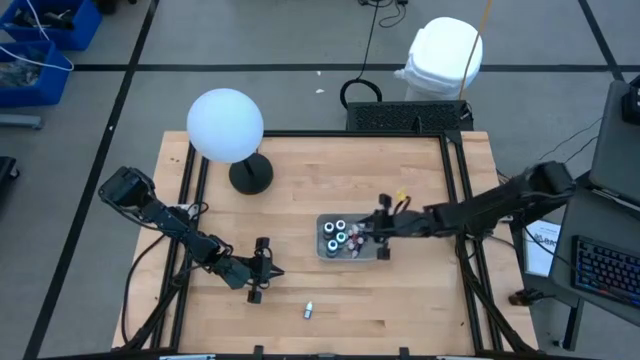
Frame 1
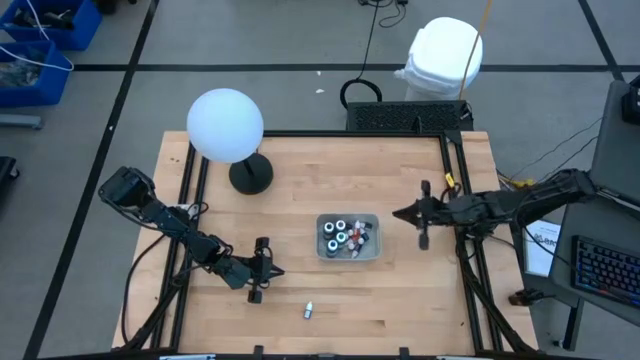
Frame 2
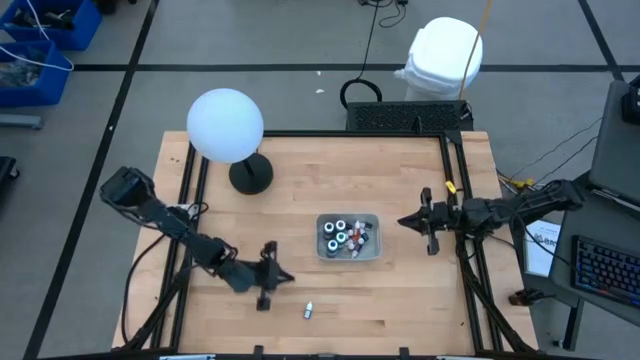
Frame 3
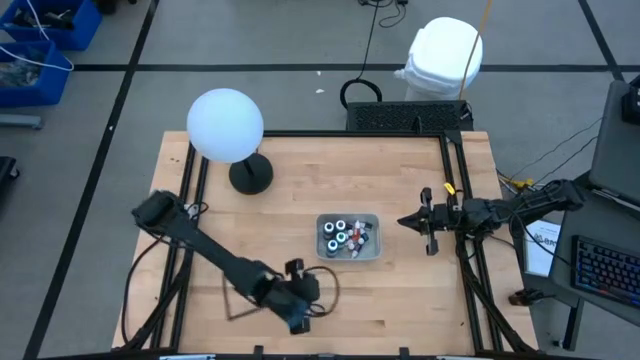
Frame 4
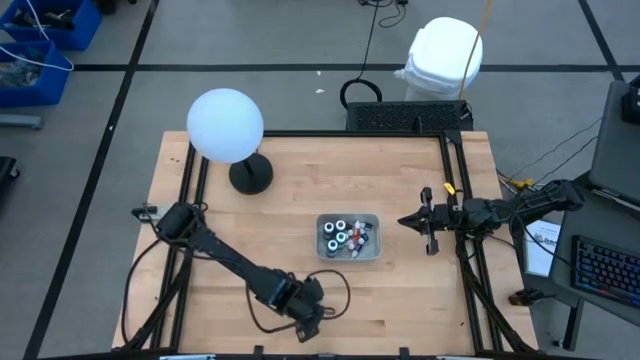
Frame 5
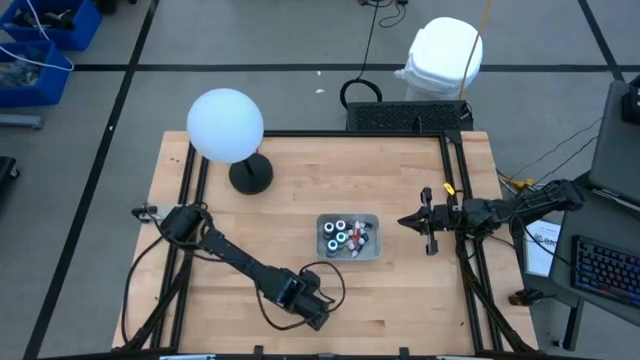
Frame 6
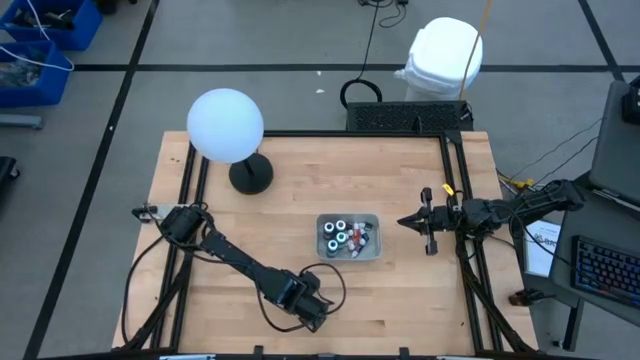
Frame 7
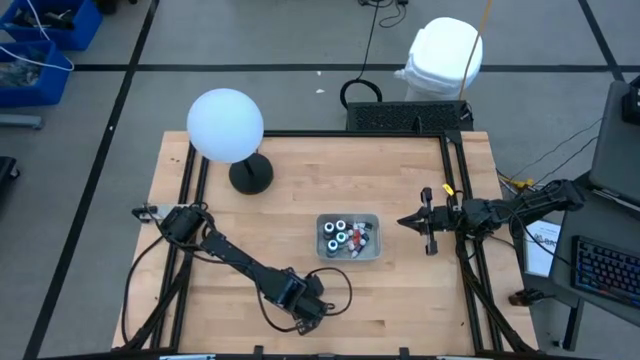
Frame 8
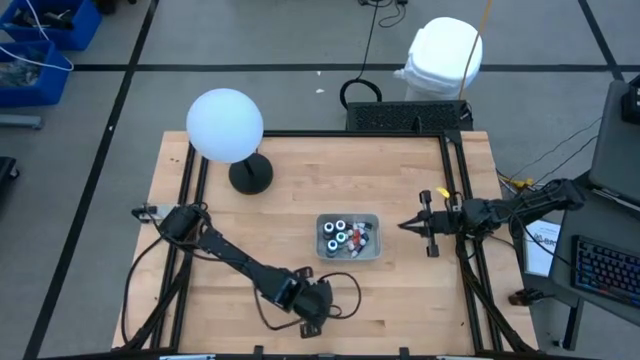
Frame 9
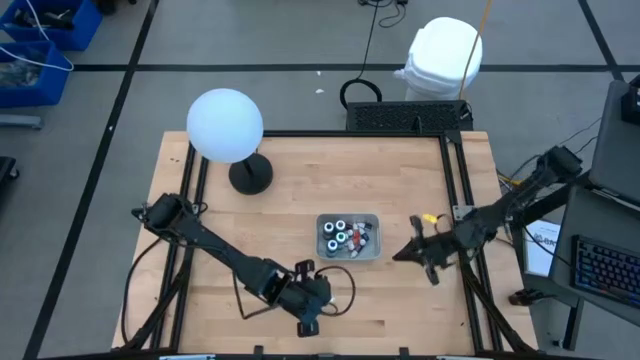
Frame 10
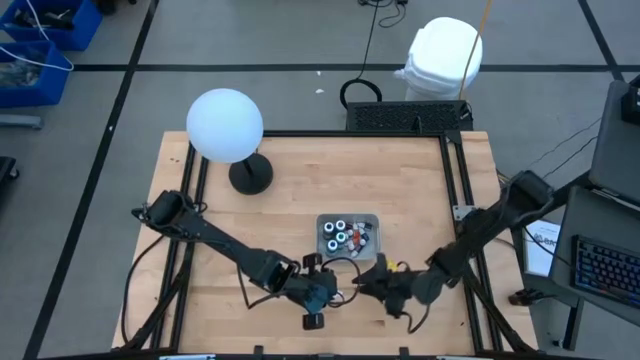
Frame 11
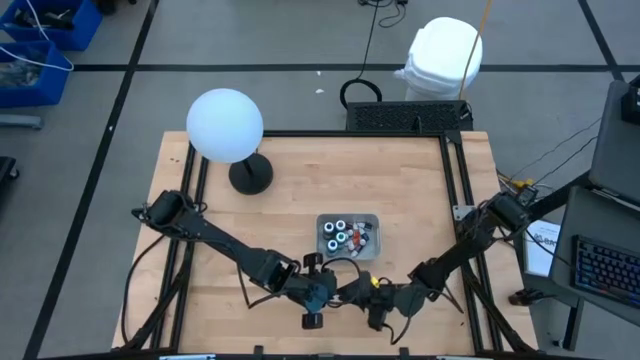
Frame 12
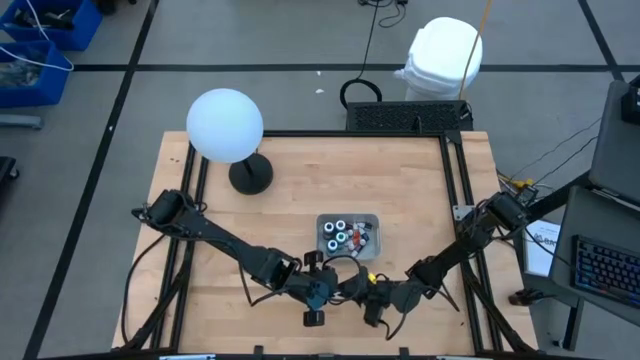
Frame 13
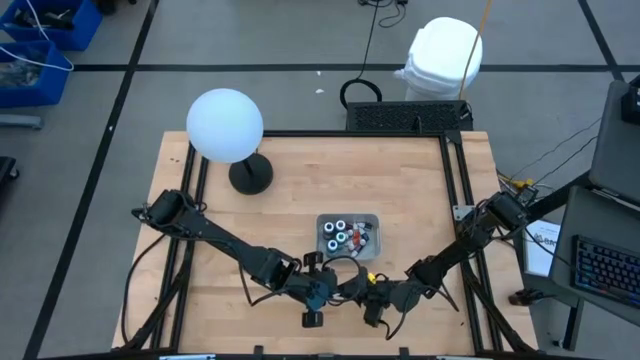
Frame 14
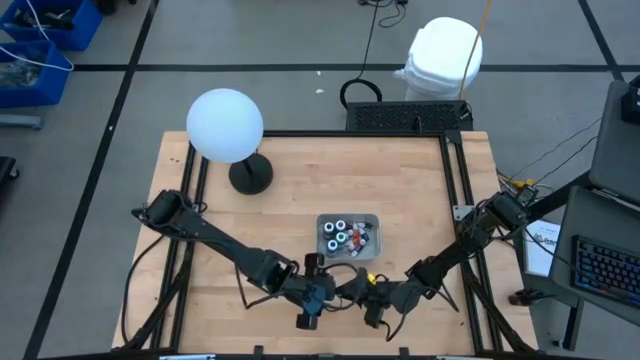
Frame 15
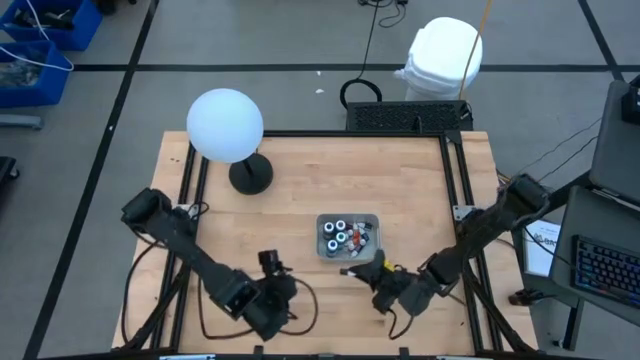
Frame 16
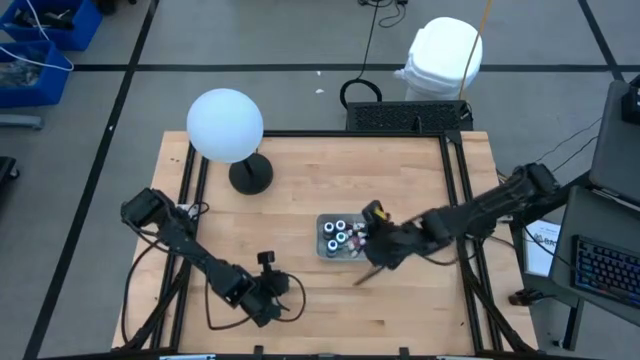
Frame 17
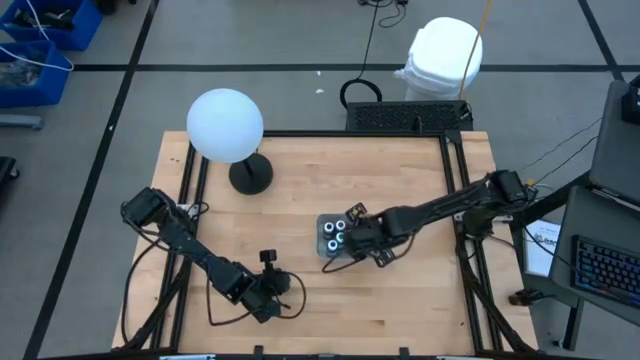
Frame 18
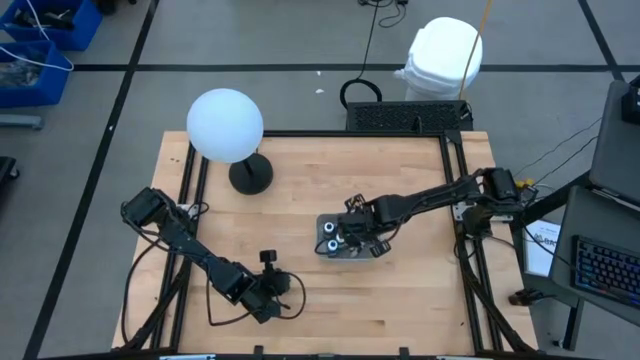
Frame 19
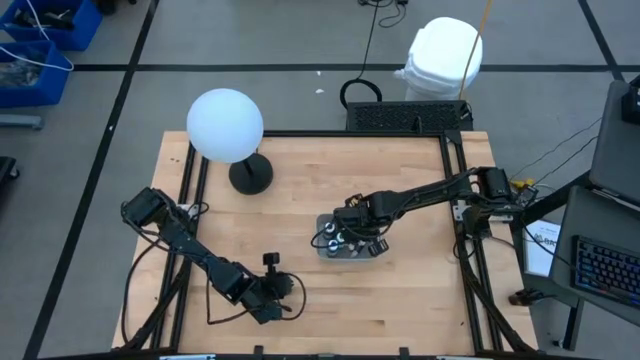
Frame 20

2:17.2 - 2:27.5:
Task: Pick & Place food coloring
Put the small dark purple food coloring bottle into the gray bin

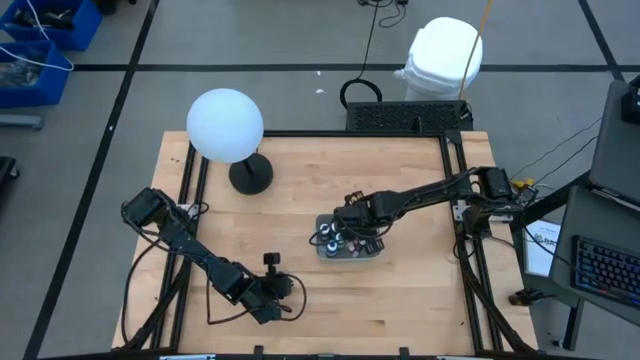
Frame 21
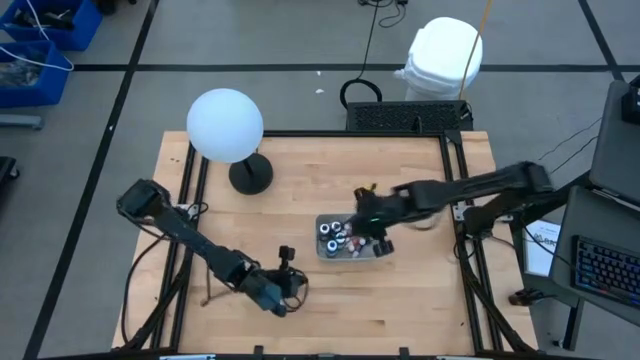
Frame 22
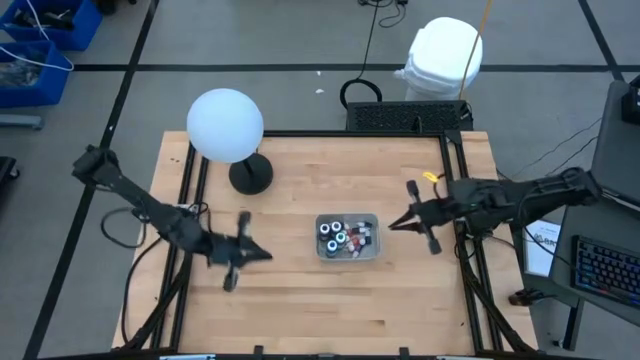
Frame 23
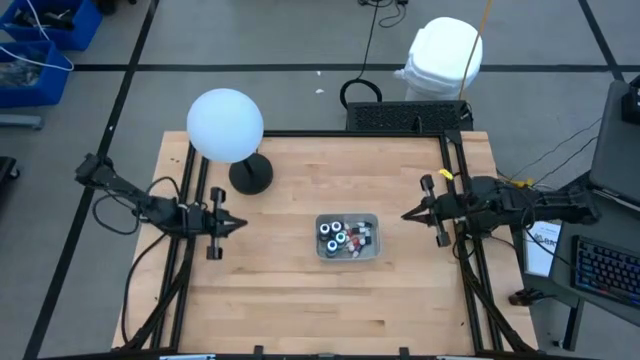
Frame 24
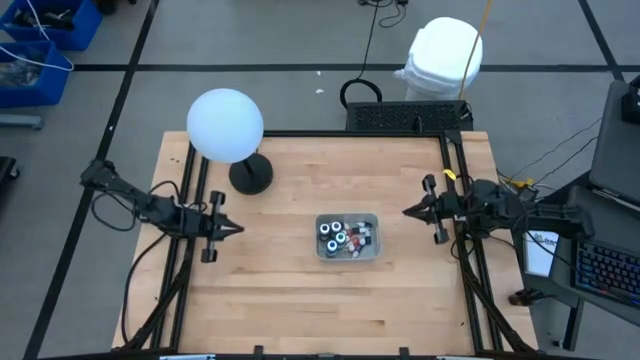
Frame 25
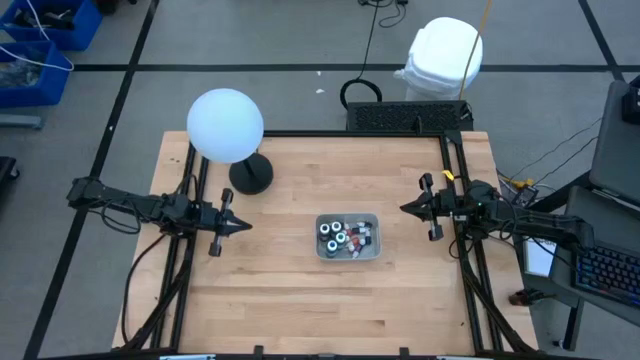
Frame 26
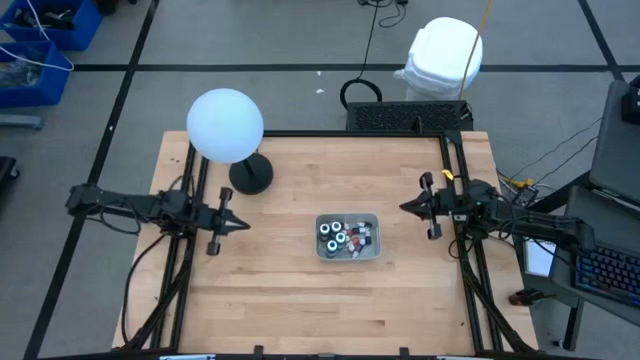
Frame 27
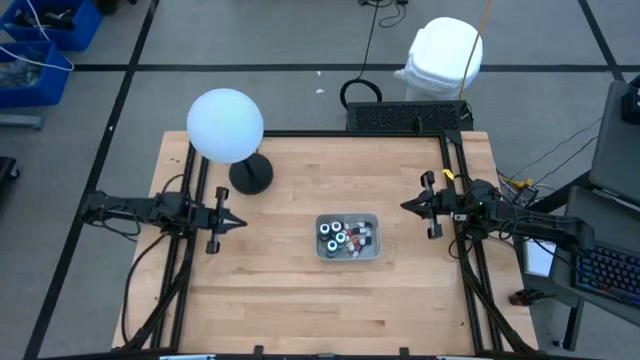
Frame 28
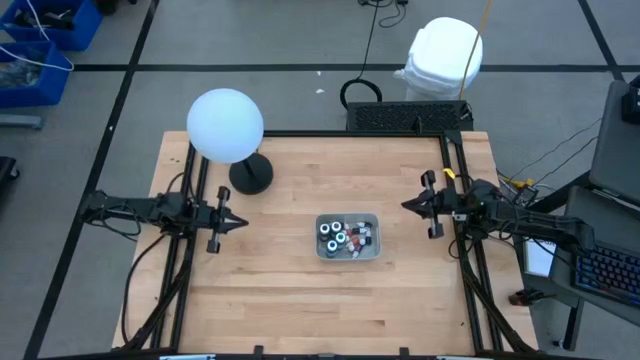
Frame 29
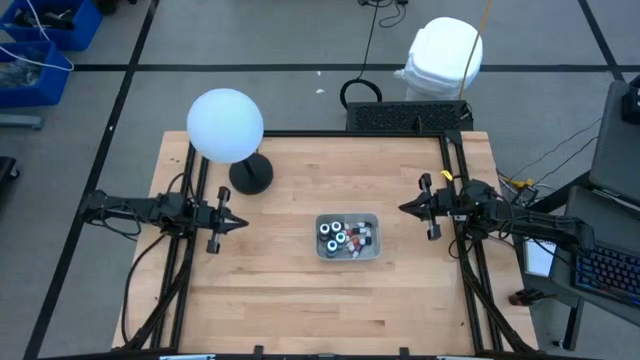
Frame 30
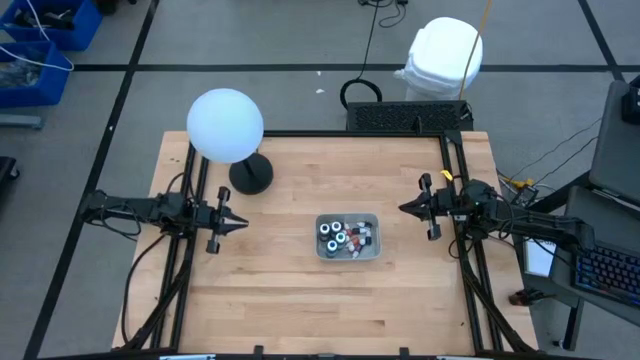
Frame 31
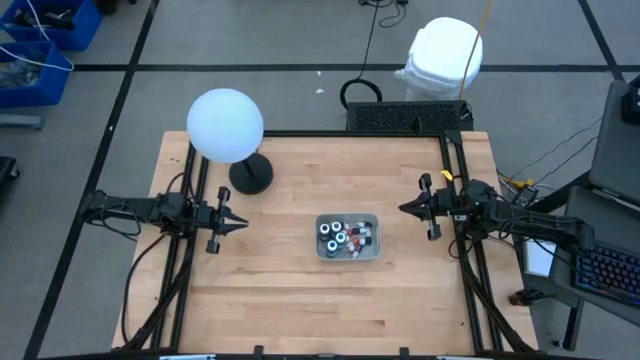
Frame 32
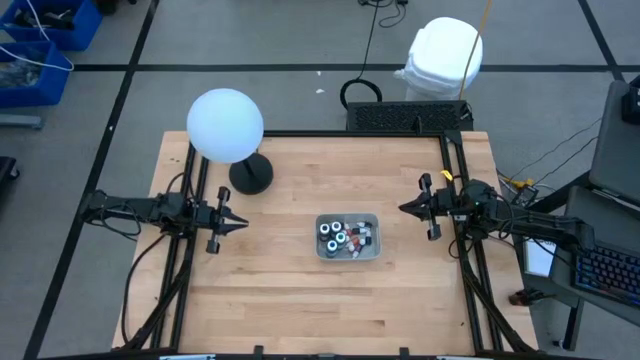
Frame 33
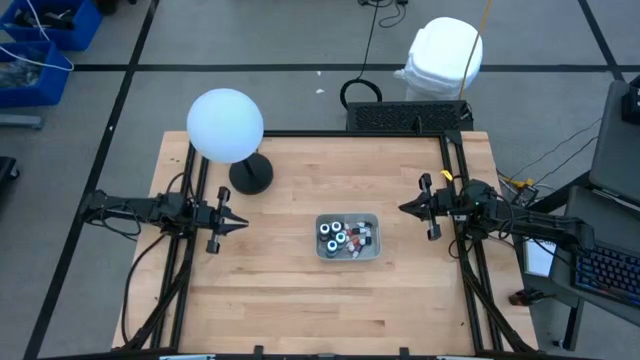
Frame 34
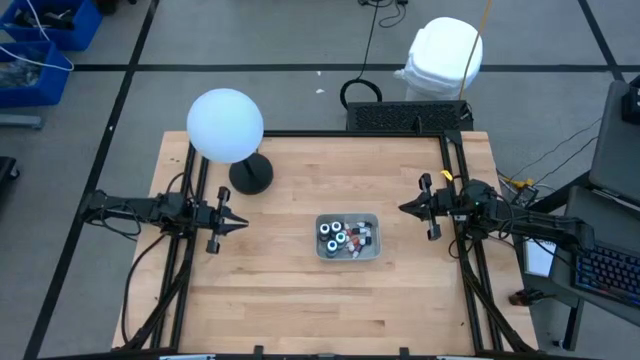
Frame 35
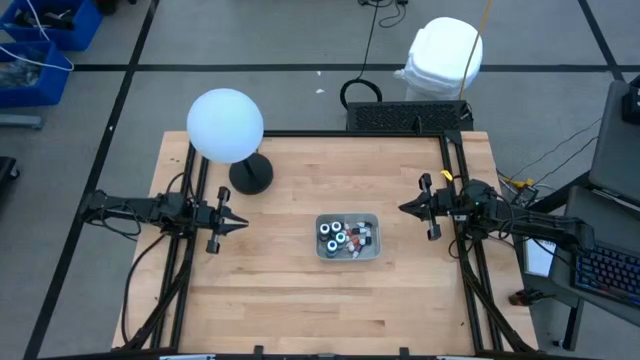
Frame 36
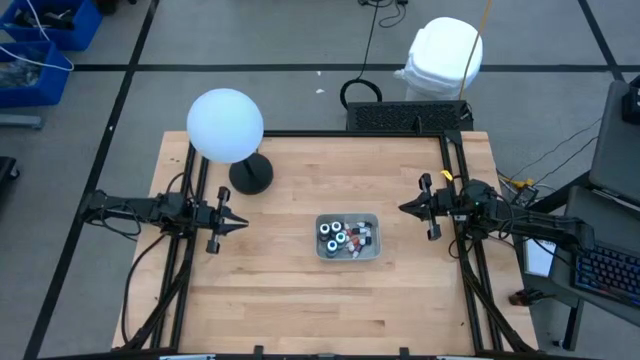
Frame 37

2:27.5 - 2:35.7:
Return to Home Position

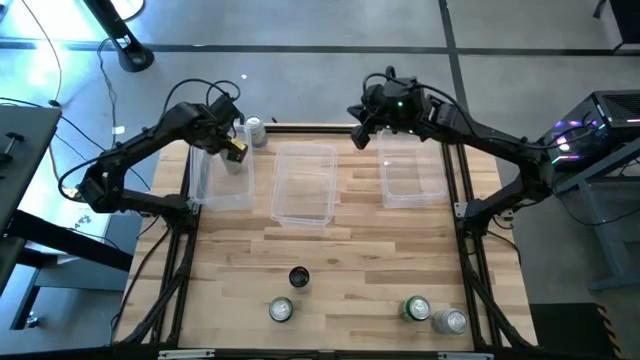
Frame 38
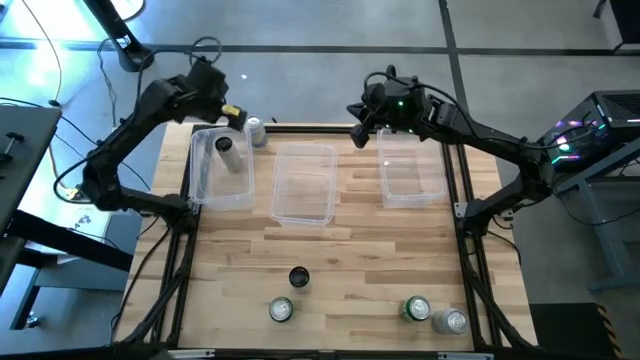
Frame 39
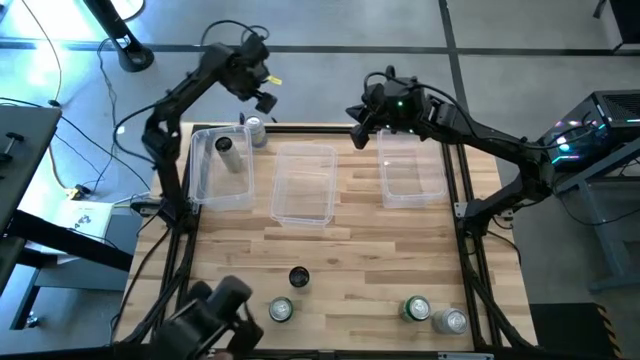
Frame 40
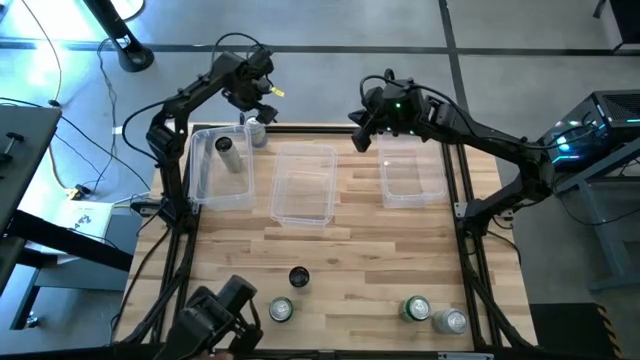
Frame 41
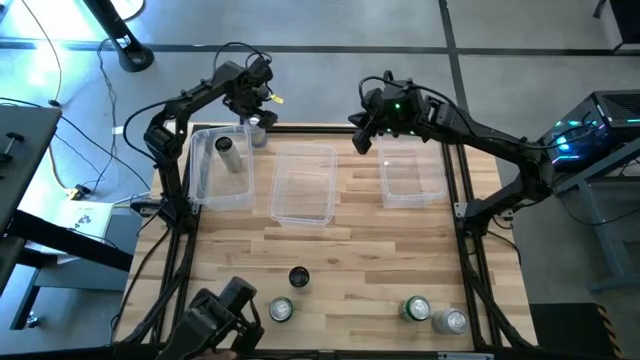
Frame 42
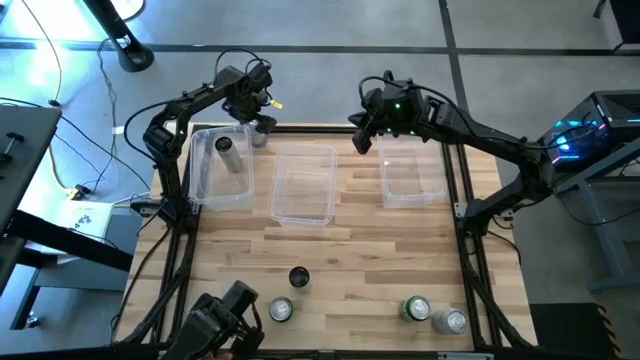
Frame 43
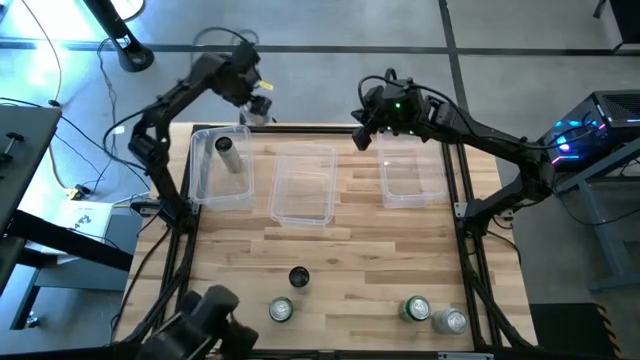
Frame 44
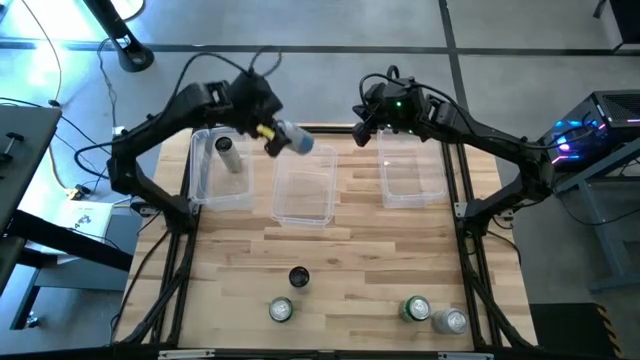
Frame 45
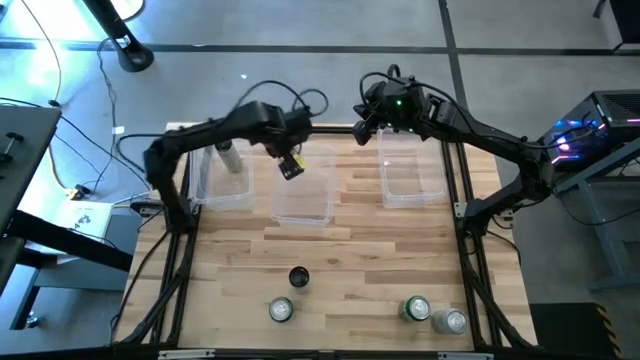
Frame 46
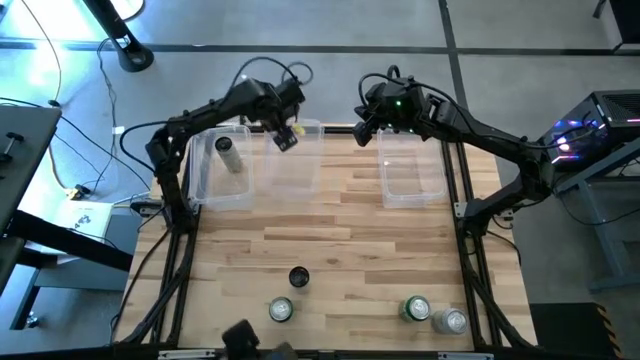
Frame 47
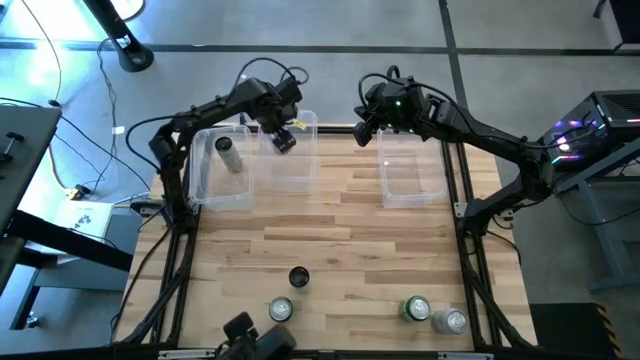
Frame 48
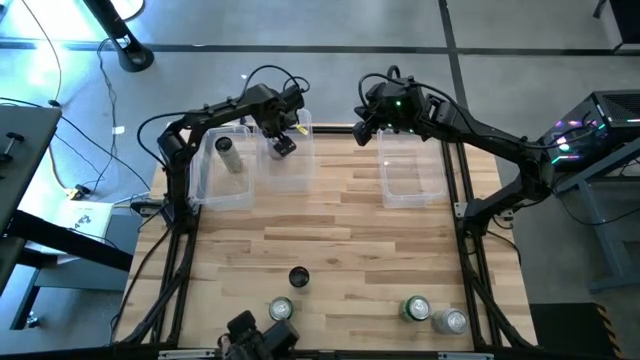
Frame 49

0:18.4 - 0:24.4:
Task: Sort soda cans
Put the top blue white soda can into the middle transparent bin
